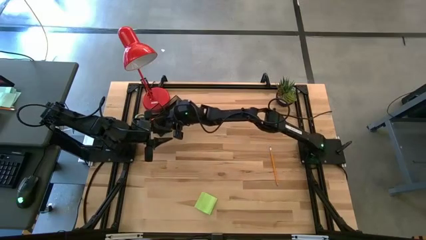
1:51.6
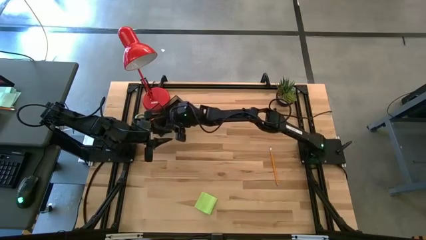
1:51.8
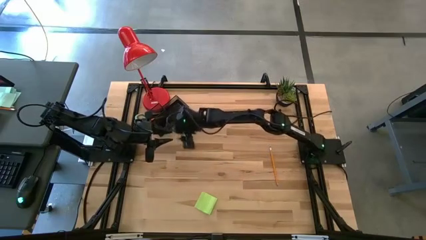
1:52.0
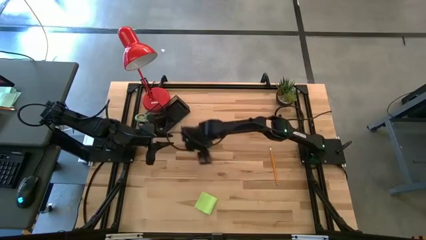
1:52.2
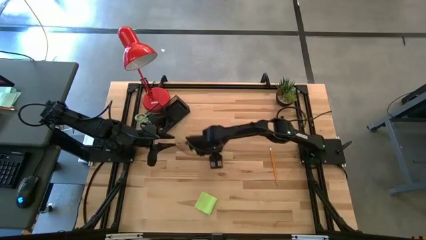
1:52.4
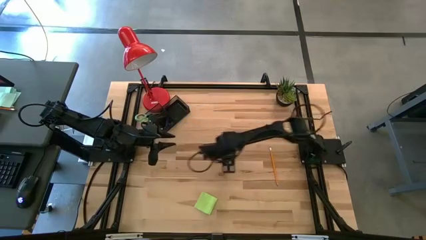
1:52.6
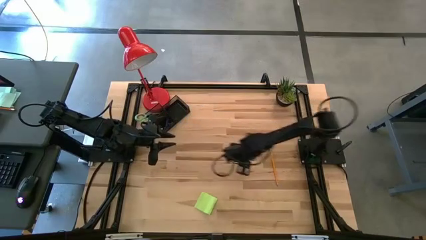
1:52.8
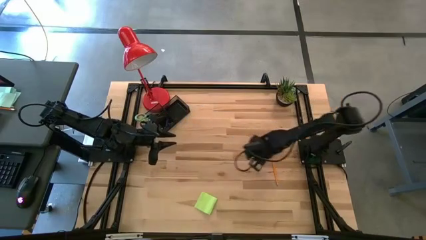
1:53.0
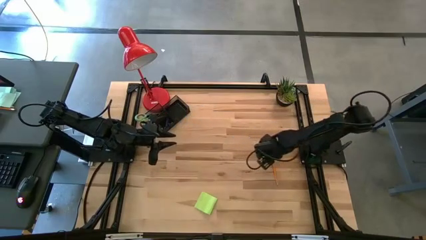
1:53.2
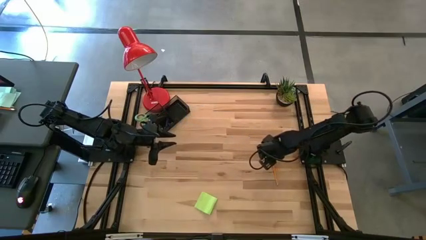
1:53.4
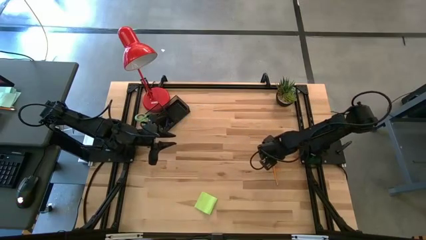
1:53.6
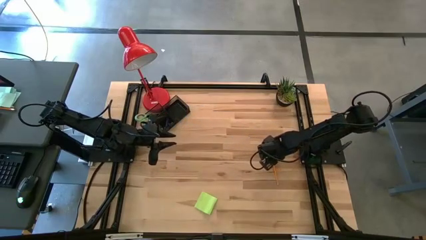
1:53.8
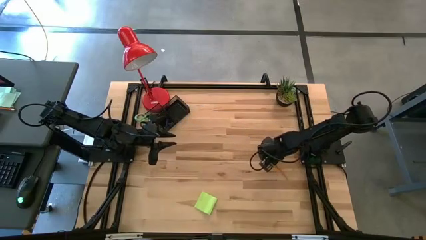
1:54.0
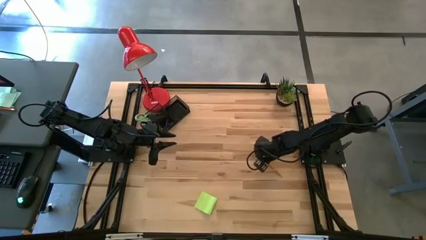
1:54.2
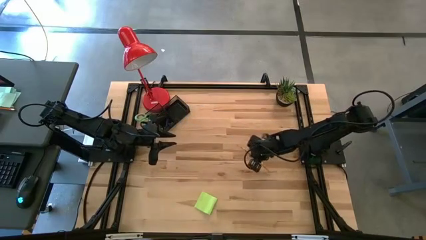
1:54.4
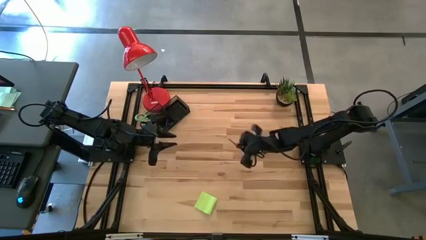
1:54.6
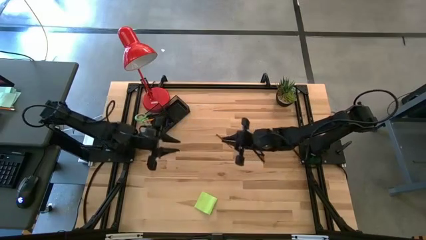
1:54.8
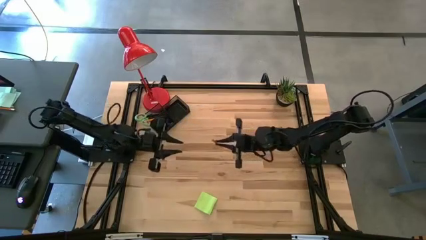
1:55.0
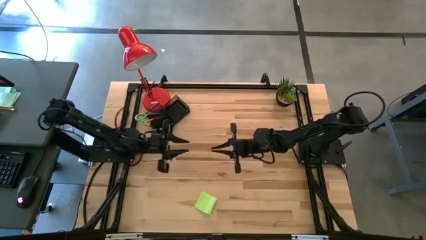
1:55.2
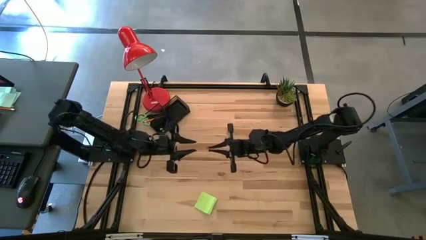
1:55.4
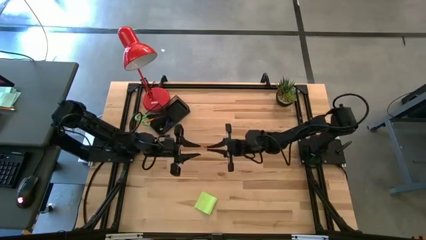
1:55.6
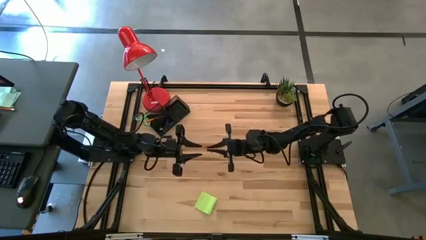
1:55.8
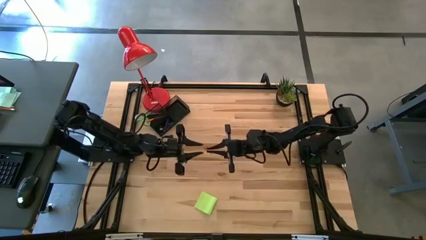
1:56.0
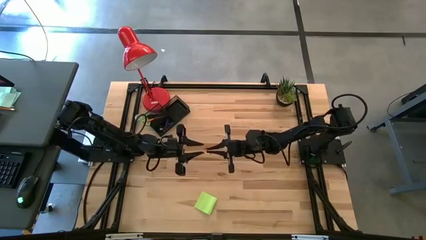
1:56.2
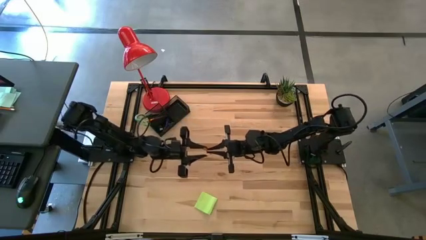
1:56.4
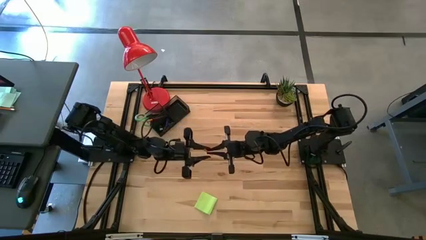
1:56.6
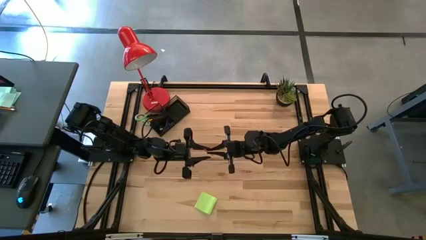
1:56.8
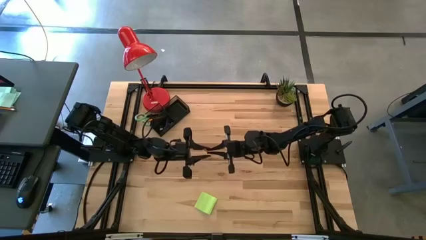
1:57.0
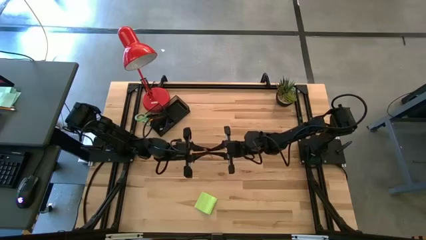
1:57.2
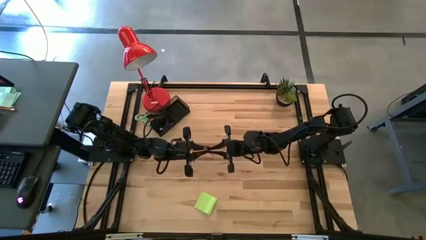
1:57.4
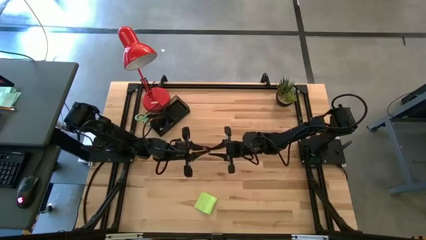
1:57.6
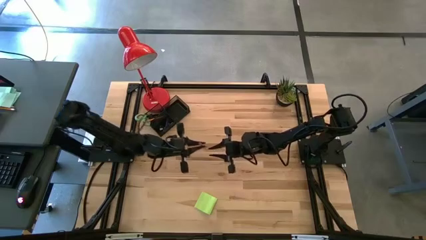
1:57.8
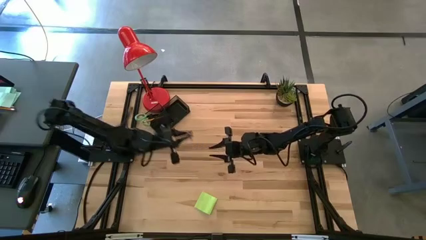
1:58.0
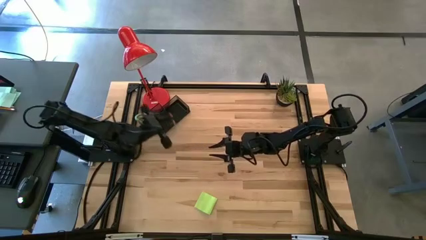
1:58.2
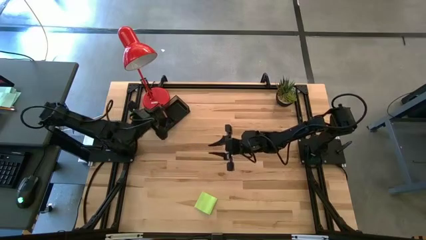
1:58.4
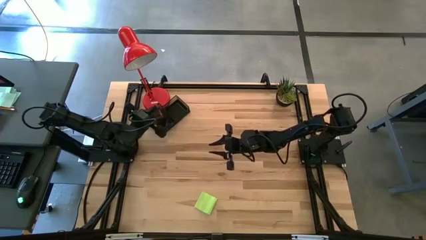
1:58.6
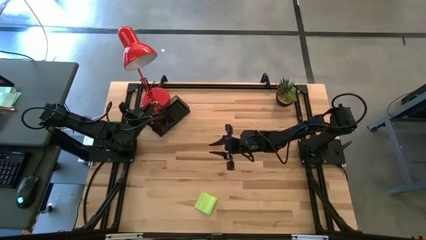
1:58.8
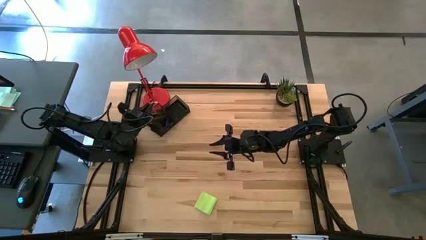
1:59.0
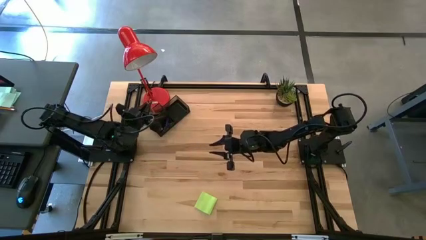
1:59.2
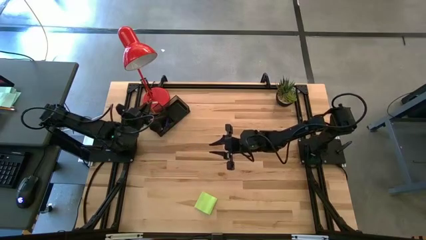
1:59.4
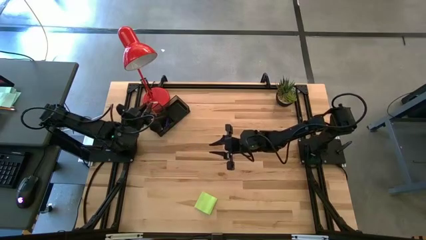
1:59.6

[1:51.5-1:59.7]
Task: Pick and place office supplies into organizer
Put the yellow pencil into the desk organizer

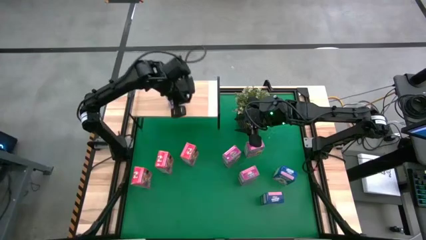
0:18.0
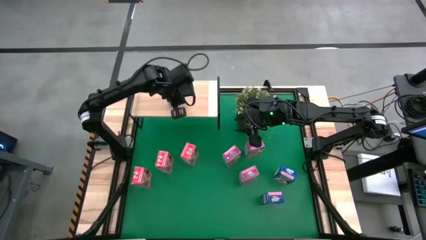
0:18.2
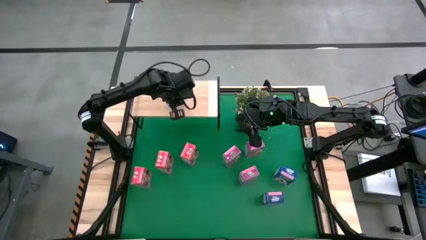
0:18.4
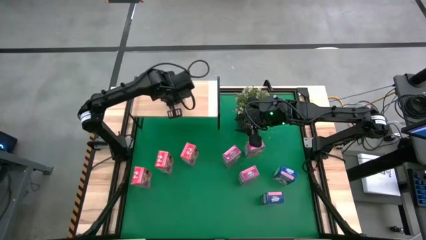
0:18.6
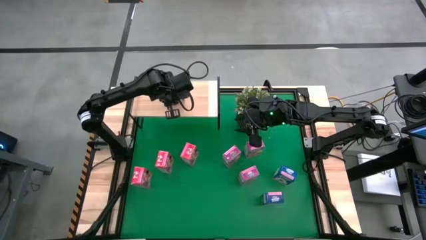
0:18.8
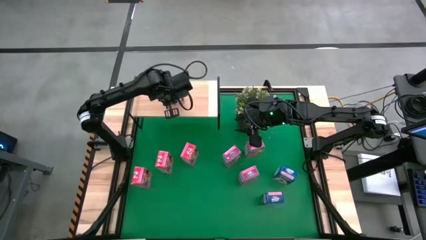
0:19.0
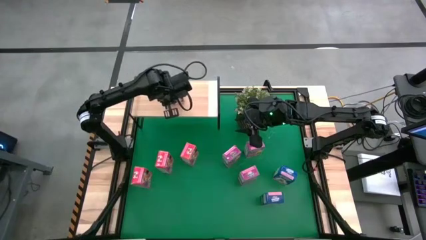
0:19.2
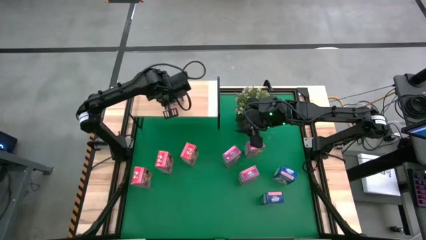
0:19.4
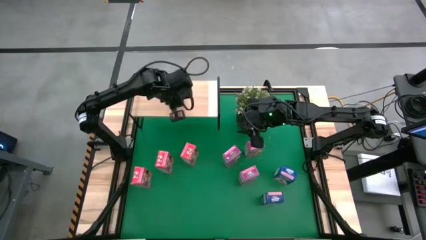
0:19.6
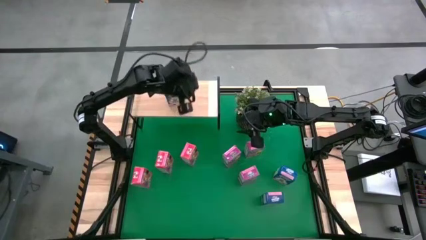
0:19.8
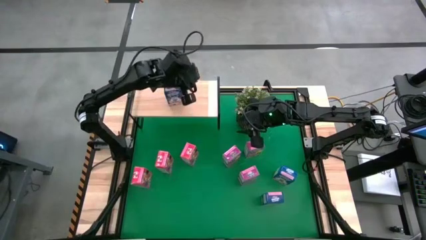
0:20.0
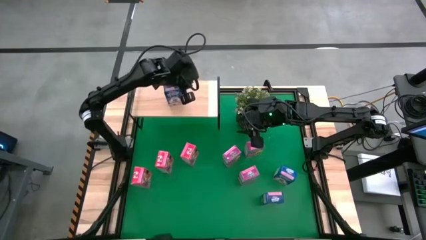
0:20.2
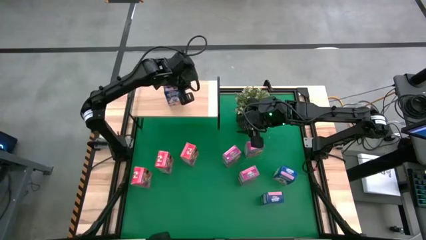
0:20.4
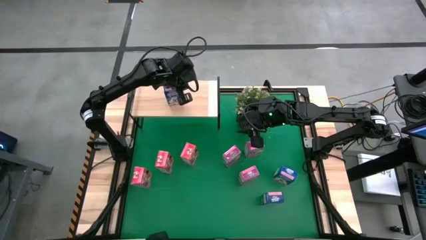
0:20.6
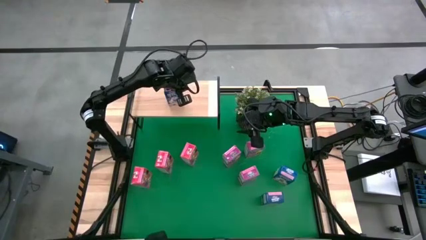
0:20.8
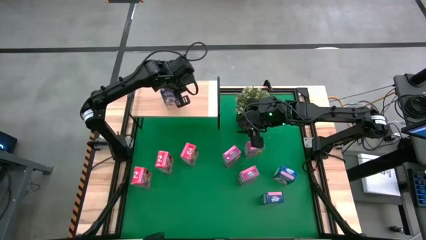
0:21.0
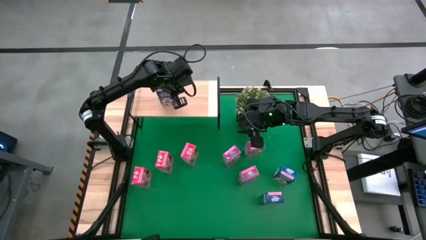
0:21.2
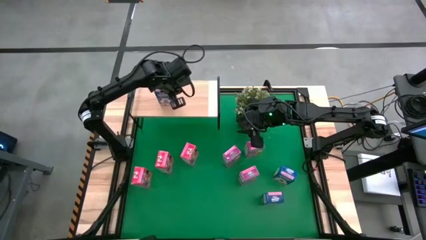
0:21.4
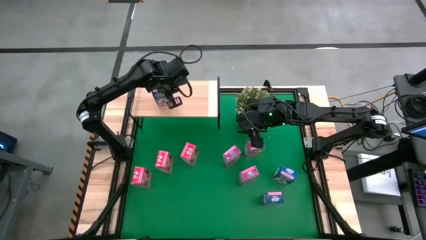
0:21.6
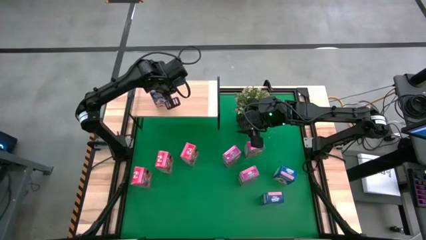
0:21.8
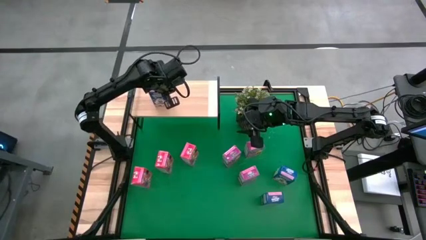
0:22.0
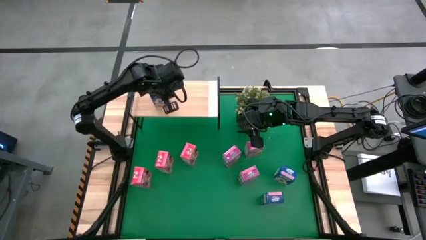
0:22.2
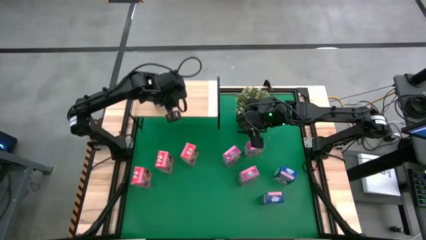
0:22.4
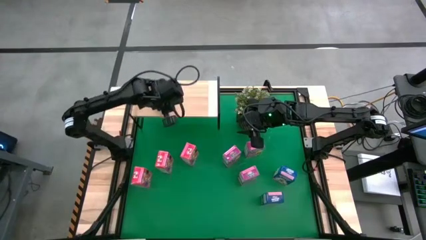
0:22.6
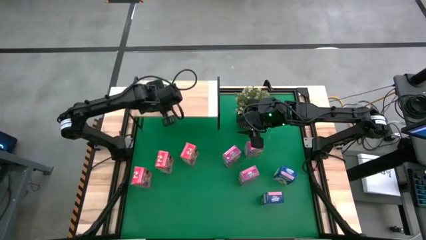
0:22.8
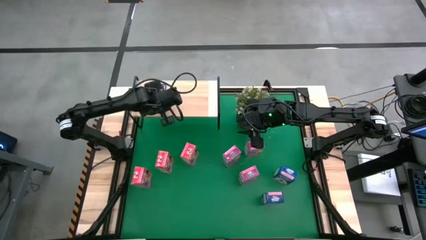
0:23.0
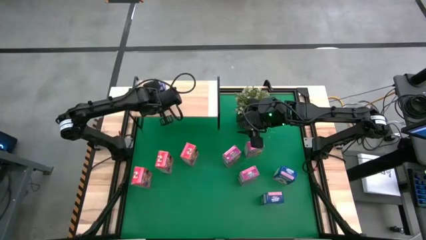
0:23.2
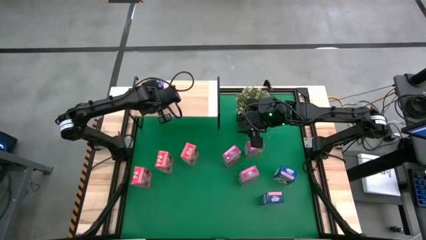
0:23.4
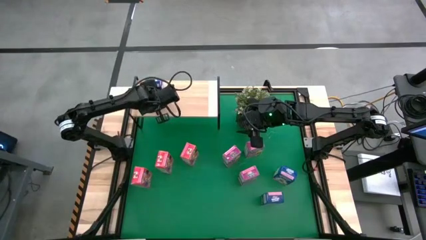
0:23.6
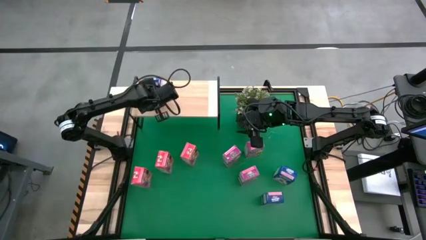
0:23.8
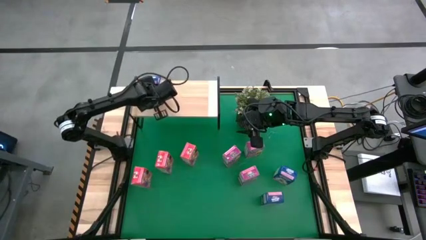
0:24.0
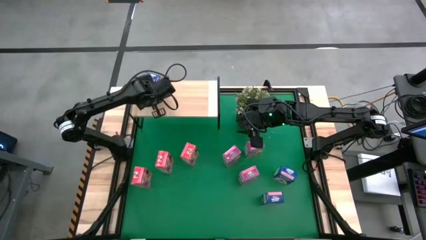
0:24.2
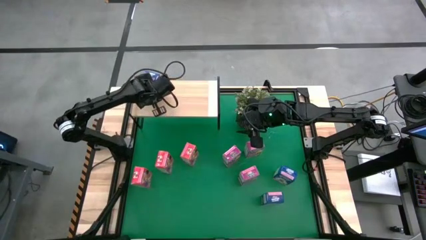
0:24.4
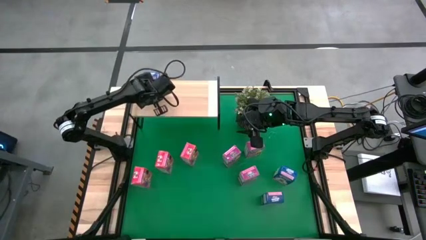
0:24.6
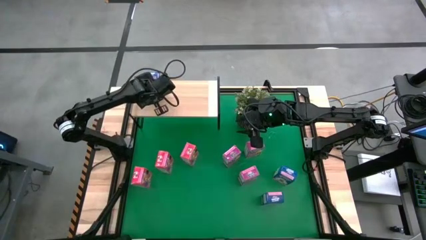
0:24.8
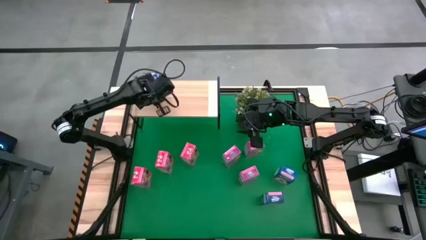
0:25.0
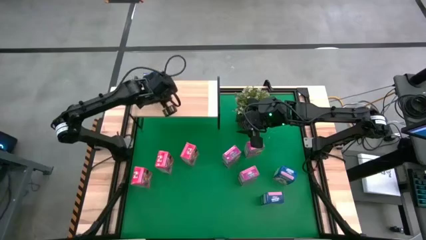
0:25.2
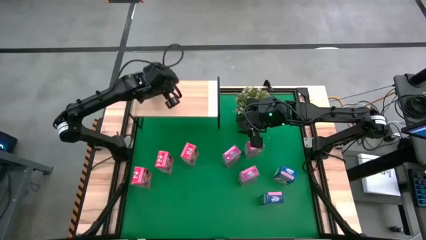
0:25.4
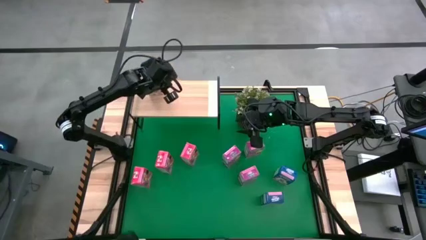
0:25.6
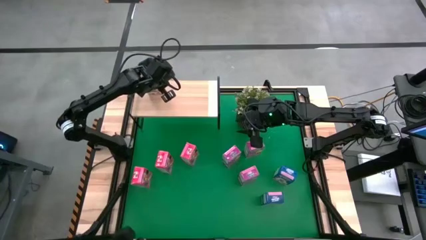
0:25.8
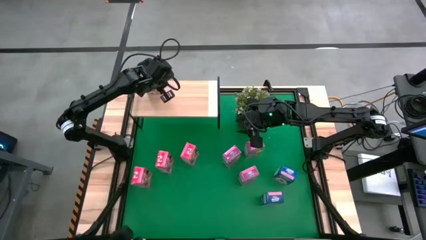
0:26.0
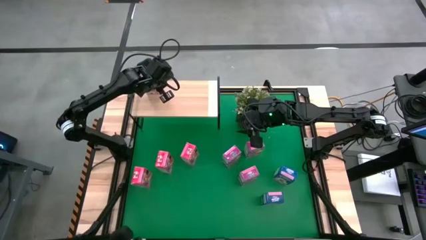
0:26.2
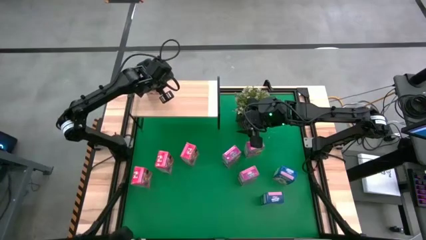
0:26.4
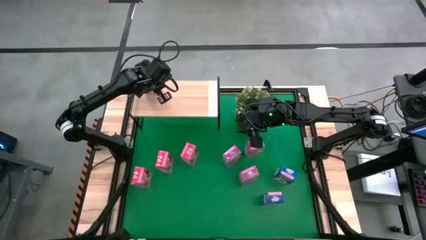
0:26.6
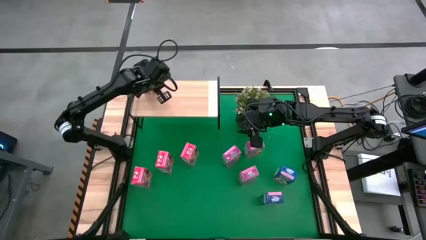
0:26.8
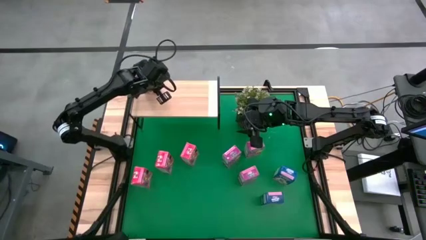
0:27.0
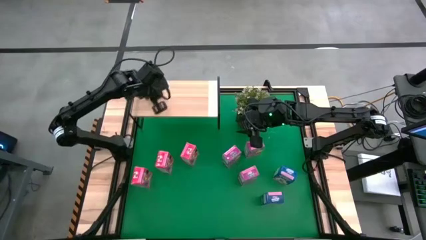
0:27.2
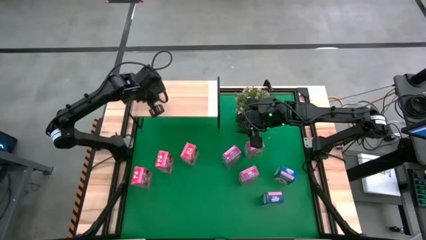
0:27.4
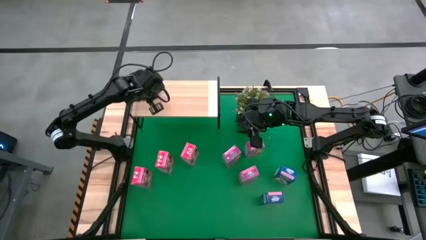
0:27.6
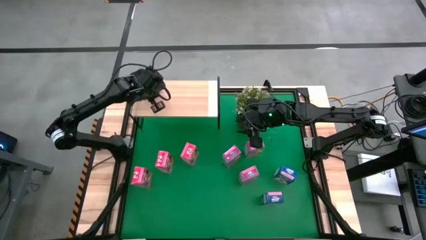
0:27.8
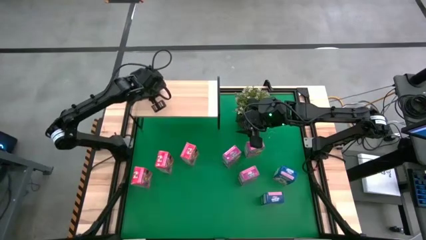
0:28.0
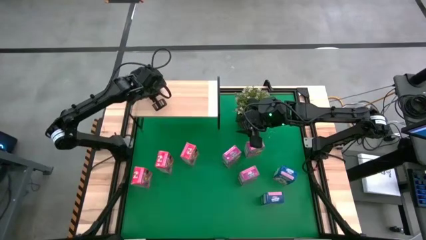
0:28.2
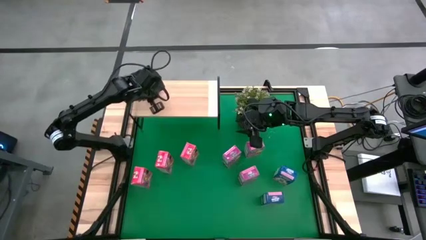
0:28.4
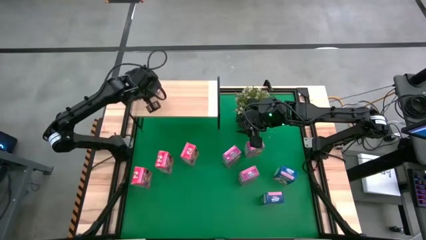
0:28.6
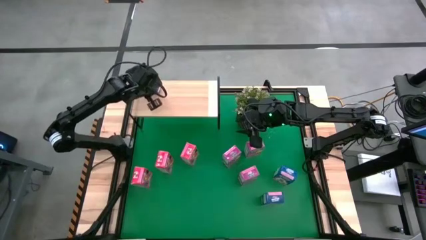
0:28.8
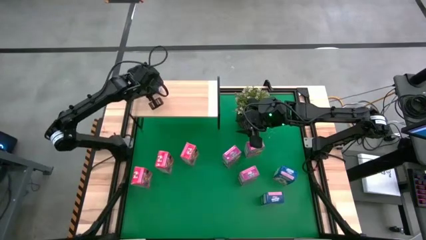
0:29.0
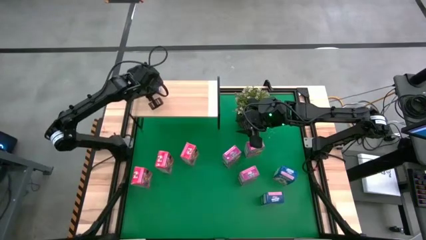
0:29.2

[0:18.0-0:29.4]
Task: Stack cereal on shelf
Put the left blue cereal box on the shelf
